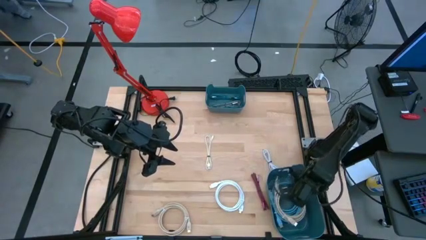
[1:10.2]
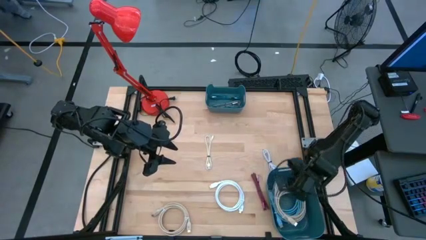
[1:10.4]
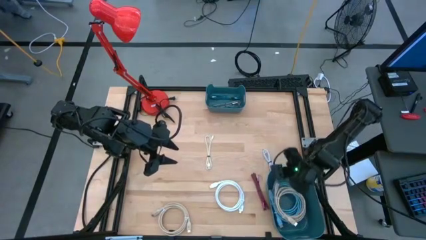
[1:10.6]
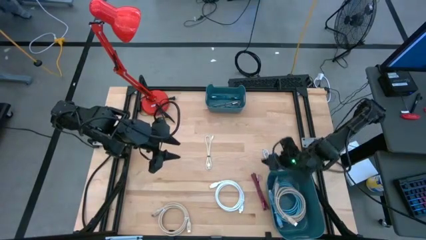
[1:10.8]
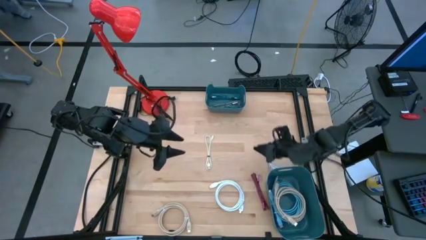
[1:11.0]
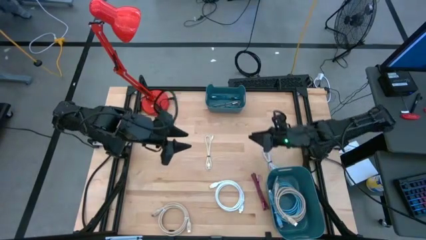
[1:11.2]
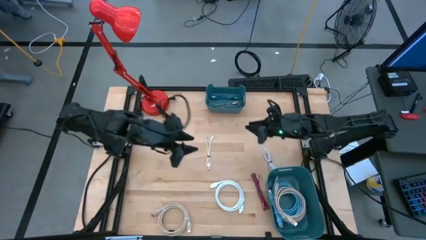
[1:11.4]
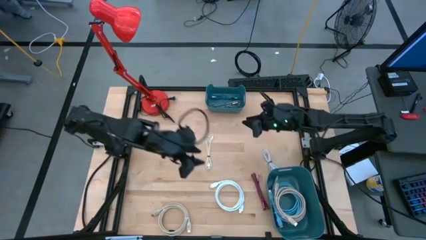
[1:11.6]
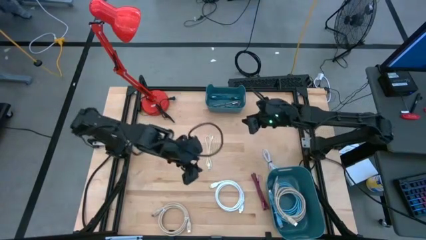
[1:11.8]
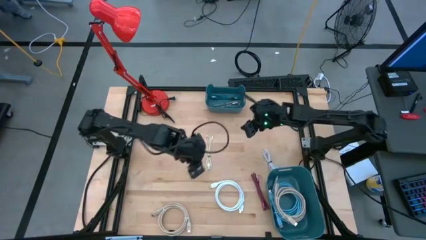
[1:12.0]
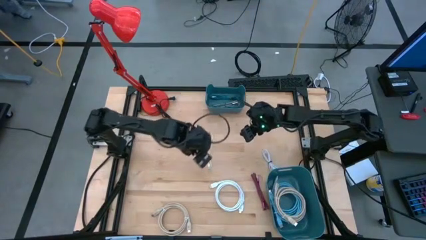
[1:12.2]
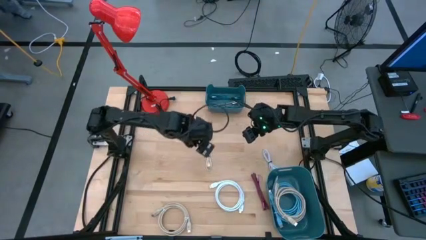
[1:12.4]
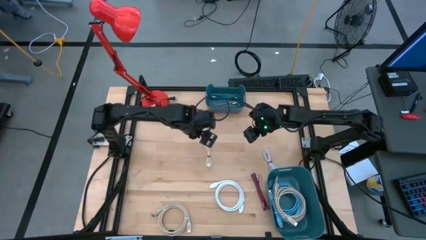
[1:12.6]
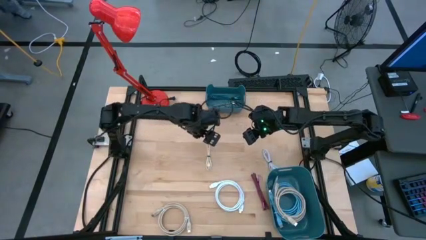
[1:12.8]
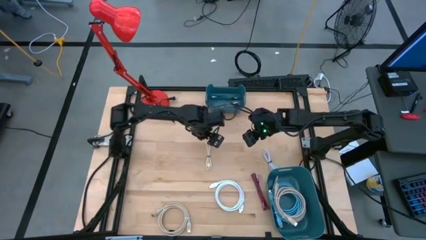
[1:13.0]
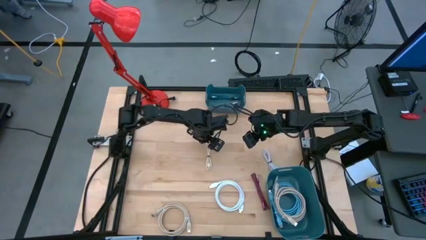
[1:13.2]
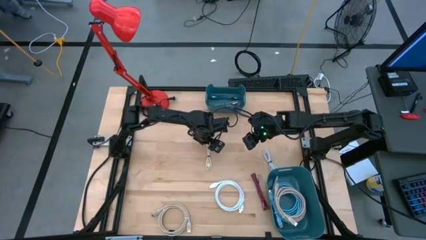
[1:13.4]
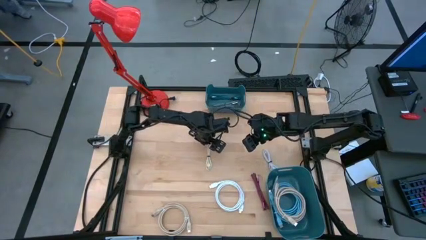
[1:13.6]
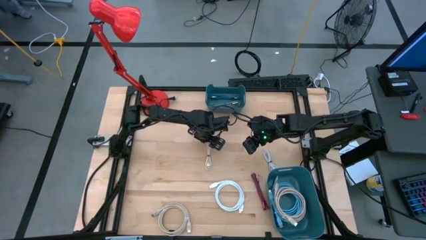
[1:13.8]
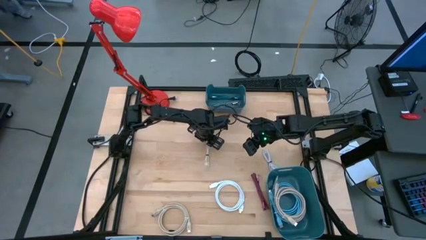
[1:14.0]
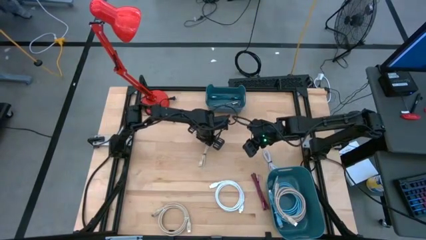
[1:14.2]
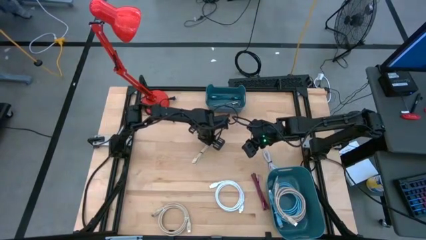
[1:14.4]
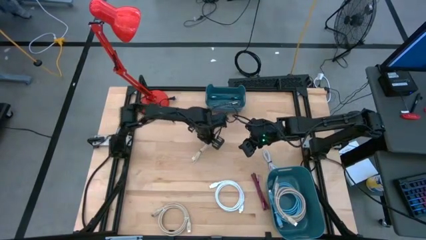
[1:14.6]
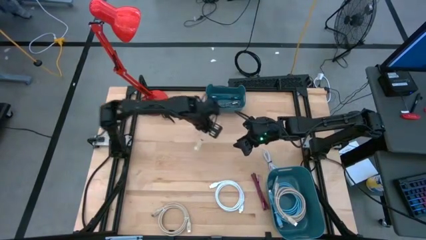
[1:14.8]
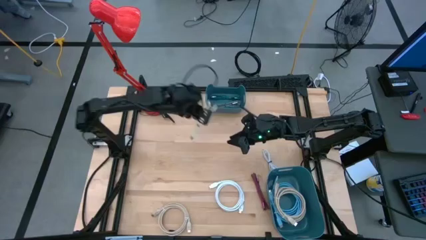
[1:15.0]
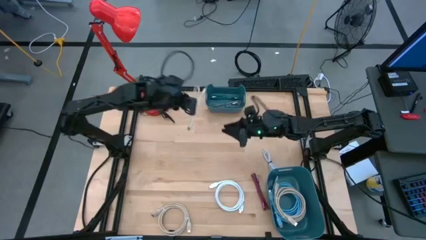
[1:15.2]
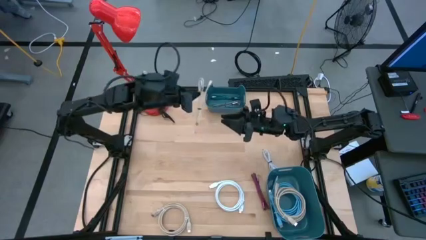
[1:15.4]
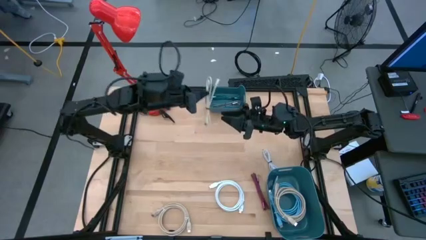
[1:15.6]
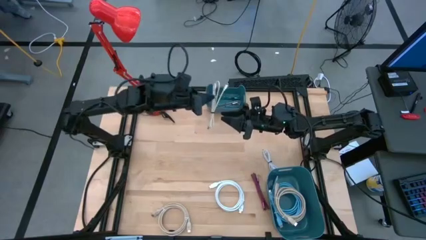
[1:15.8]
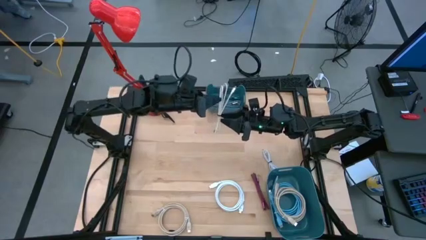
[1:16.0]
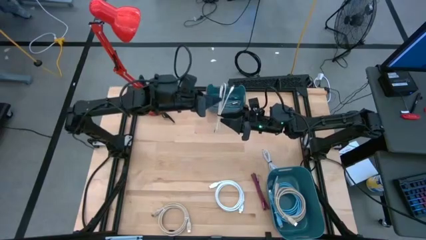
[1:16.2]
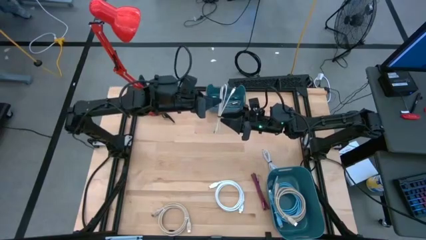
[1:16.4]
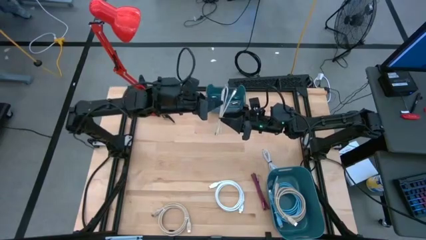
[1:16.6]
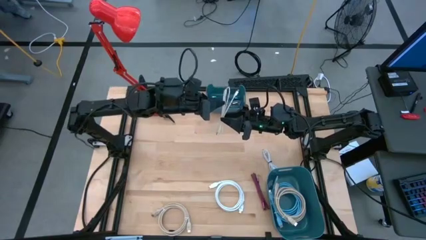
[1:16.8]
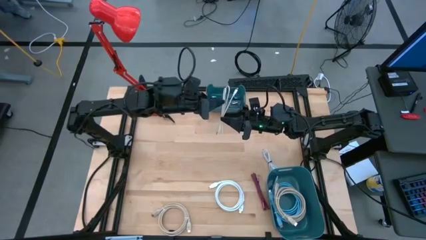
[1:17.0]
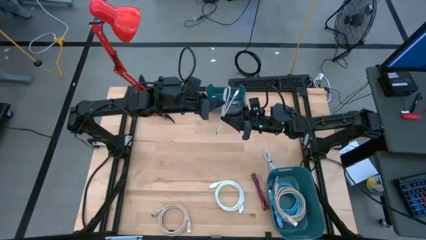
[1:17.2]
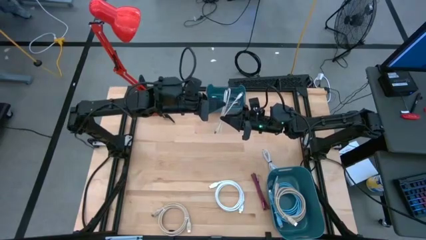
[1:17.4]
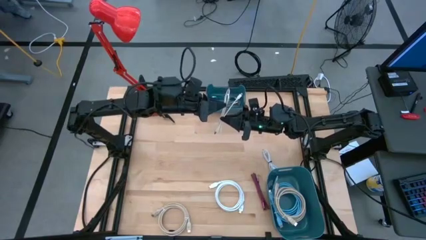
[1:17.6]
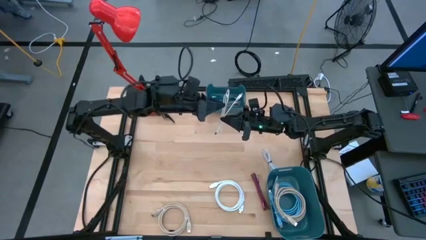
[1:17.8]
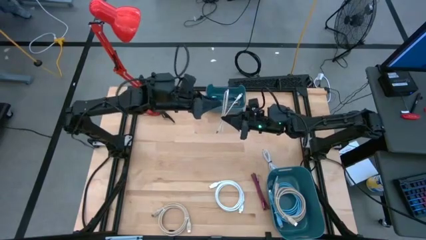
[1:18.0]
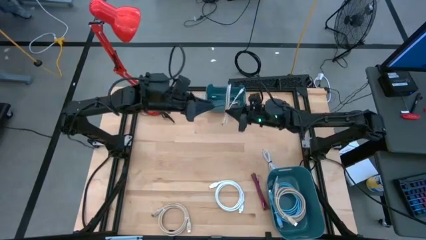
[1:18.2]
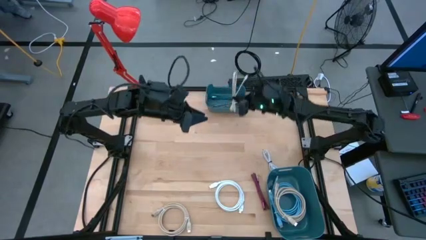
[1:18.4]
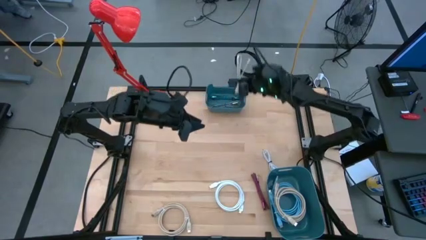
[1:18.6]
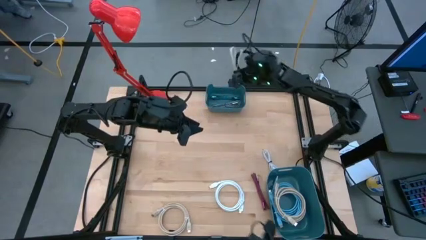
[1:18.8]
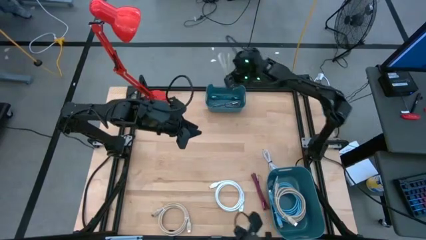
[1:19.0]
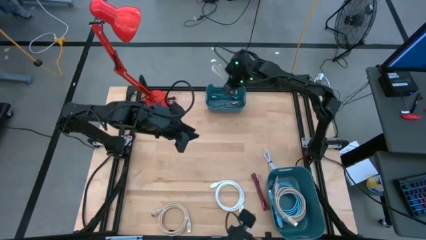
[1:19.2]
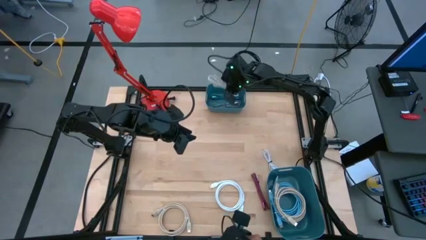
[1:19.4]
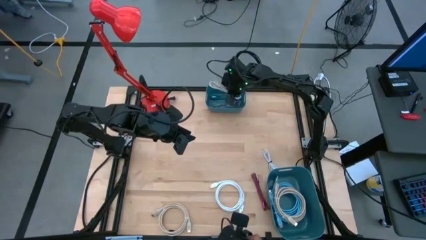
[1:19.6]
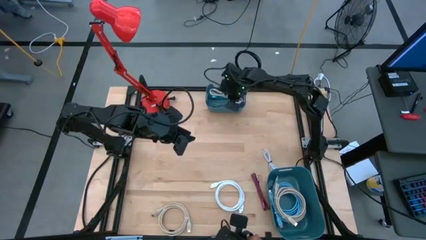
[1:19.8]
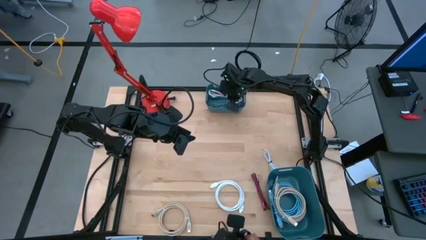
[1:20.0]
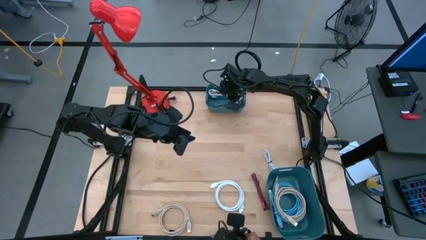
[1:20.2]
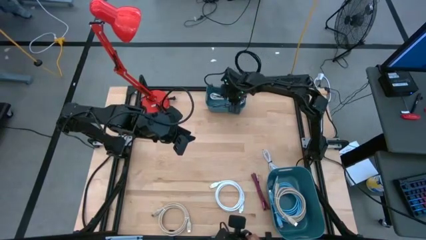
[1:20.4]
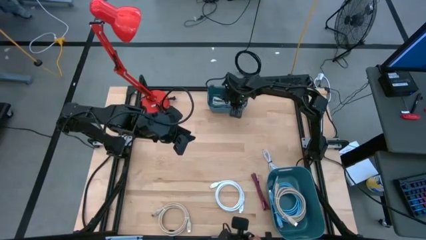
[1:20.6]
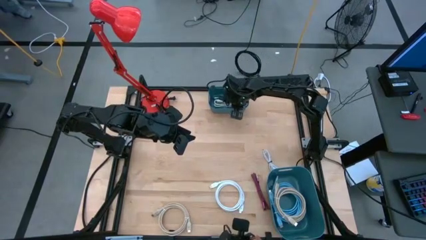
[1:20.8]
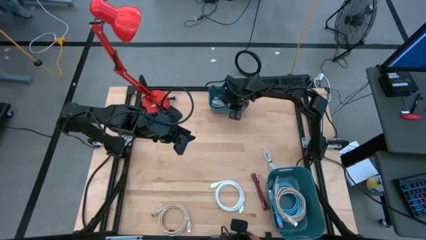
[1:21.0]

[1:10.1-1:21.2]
Task: Pick & Place USB Port
Put the top light brown charger cable into the top blue bin

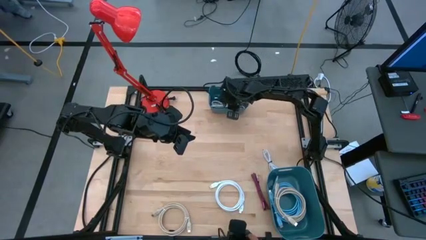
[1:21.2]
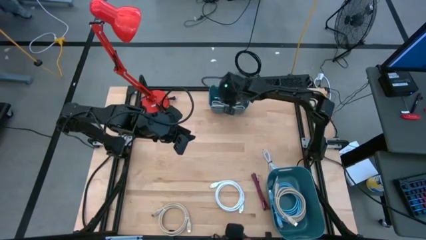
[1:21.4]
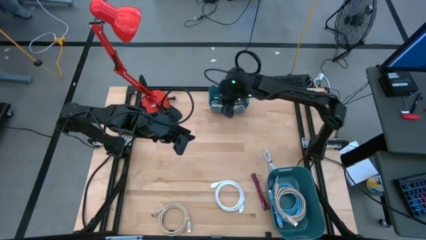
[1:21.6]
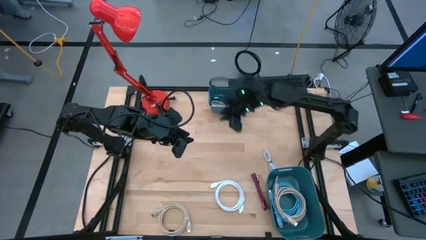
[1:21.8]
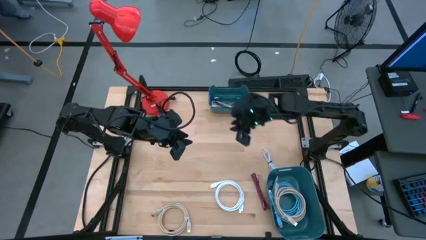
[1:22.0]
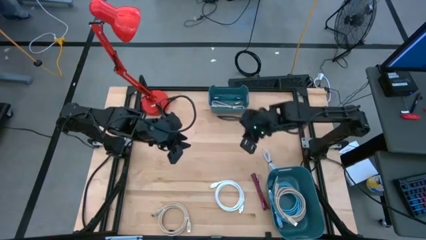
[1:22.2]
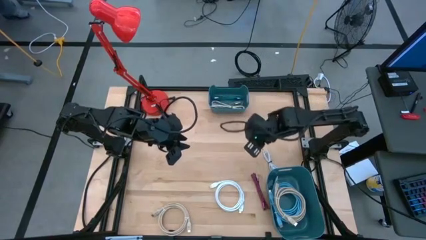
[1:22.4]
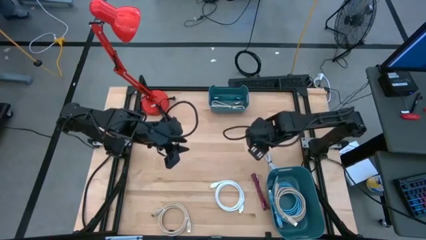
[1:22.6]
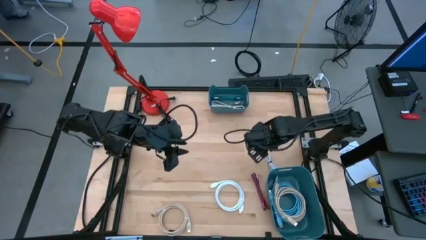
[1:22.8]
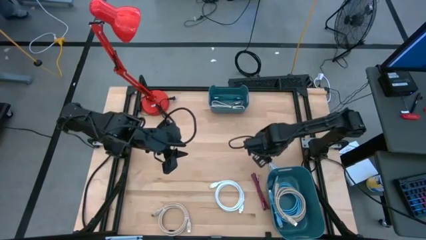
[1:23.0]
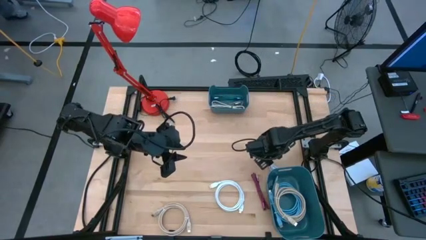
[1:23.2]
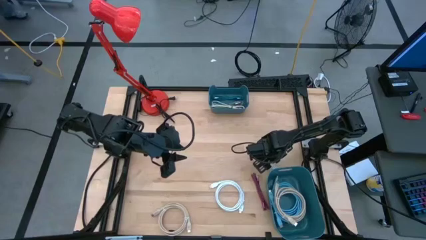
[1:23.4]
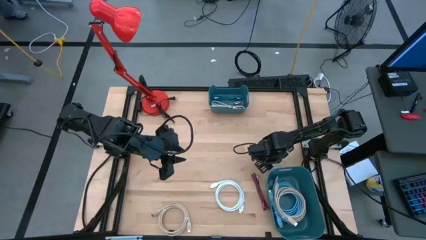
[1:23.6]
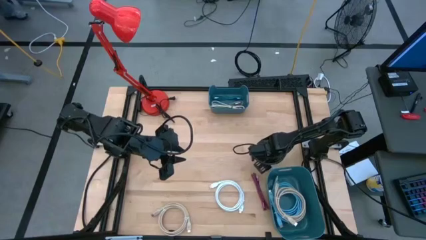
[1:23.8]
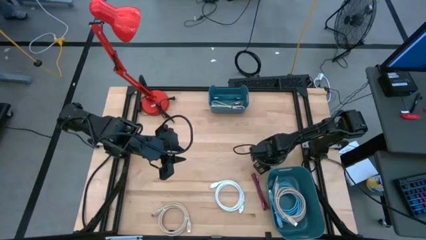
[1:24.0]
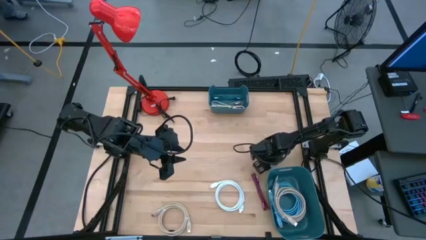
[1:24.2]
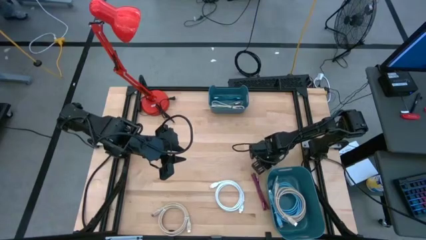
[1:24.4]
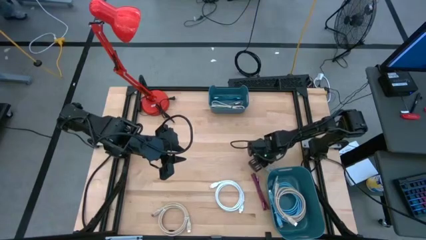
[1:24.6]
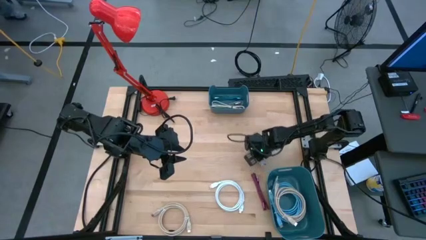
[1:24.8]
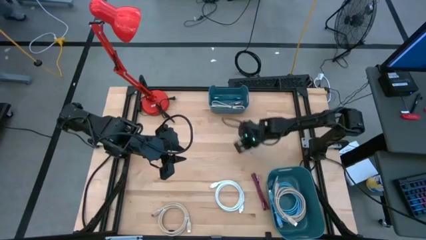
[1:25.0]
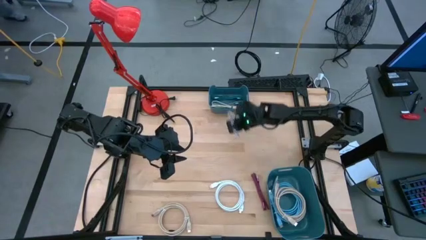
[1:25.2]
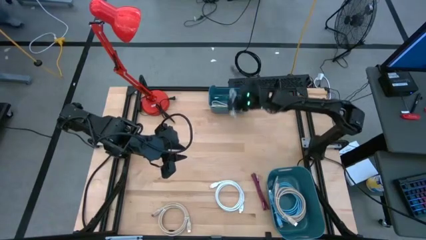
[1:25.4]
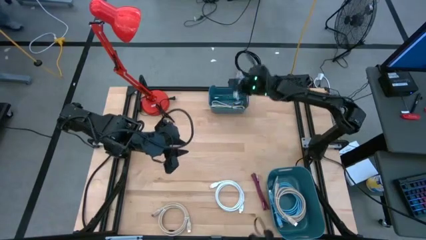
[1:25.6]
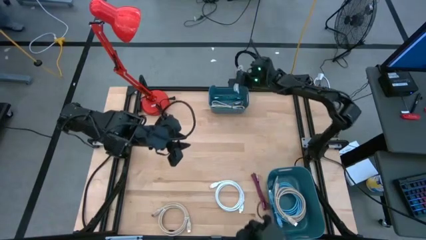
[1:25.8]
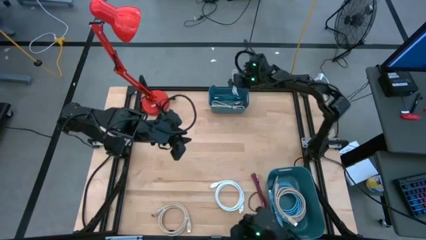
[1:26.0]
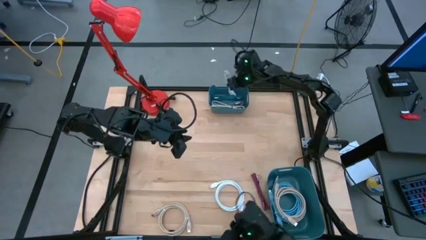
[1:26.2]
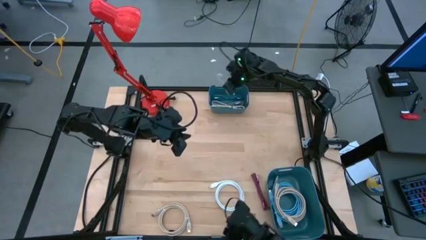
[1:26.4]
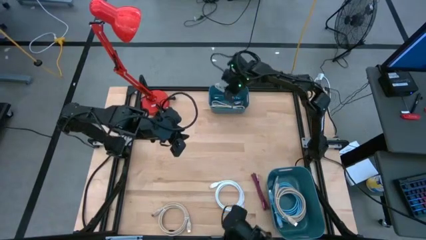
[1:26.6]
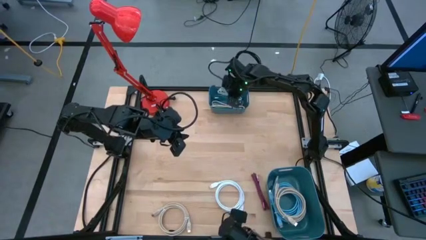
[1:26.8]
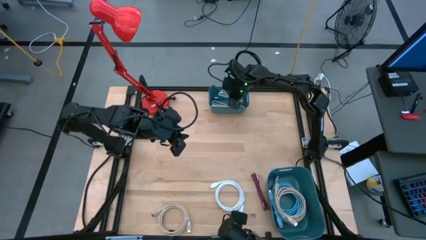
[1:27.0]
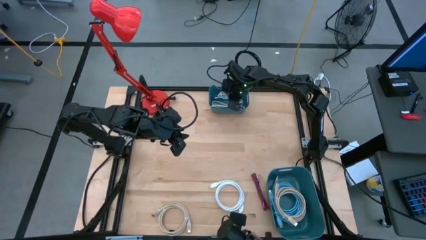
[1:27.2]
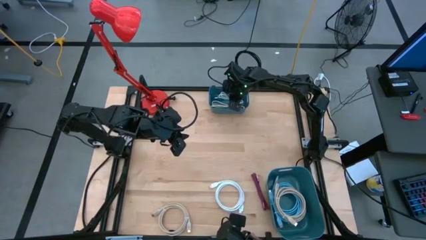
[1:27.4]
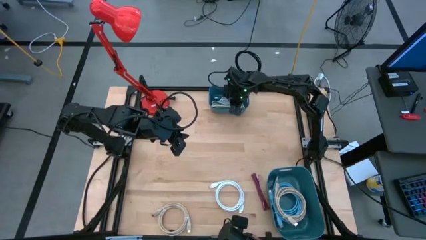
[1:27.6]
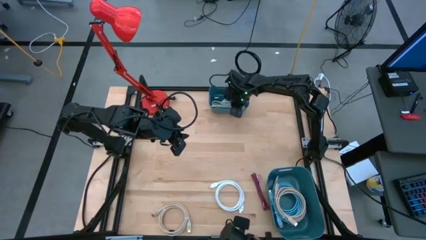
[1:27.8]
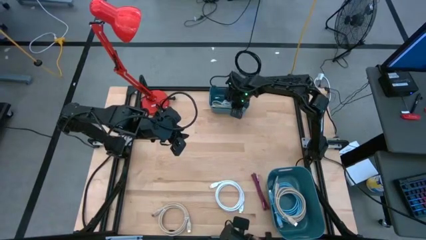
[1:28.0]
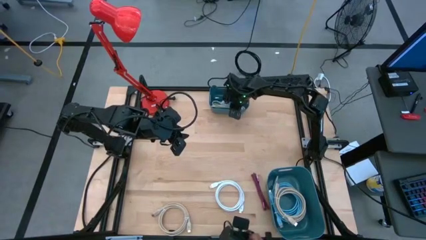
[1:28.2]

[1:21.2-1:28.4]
Put the white charger cable into the top blue bin
